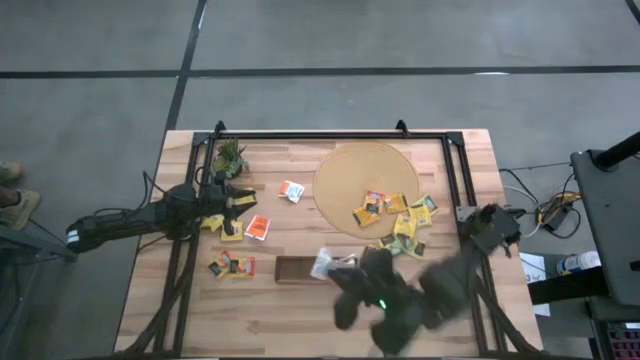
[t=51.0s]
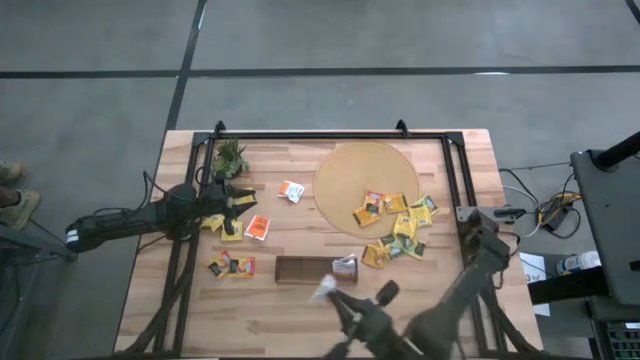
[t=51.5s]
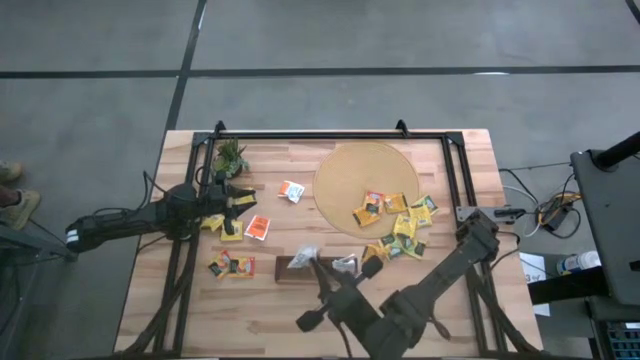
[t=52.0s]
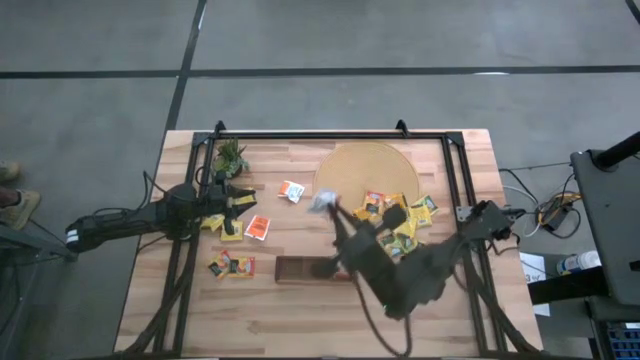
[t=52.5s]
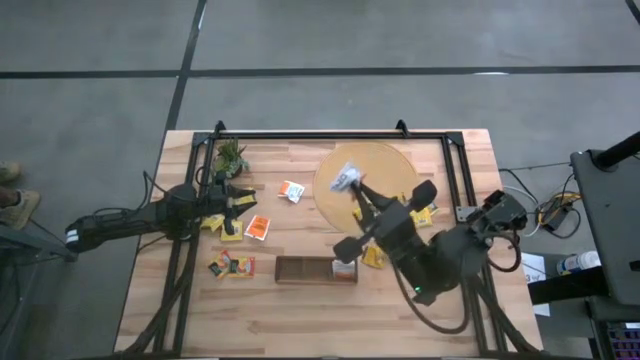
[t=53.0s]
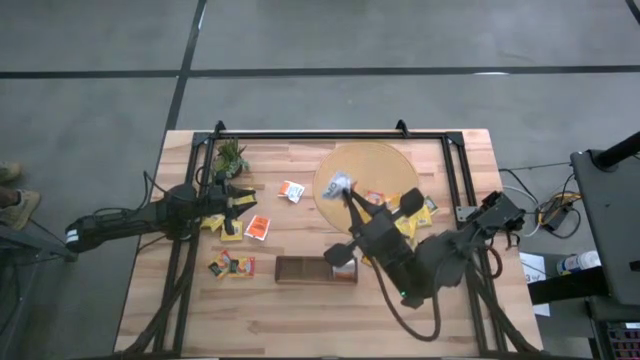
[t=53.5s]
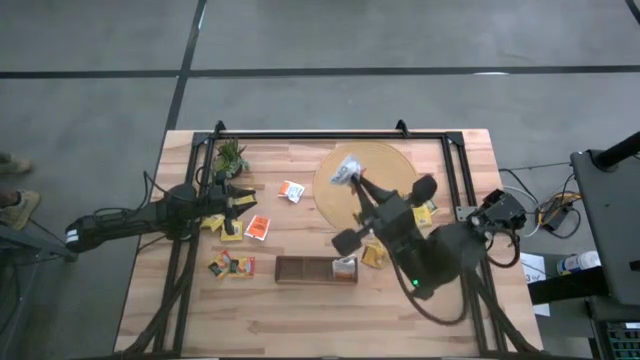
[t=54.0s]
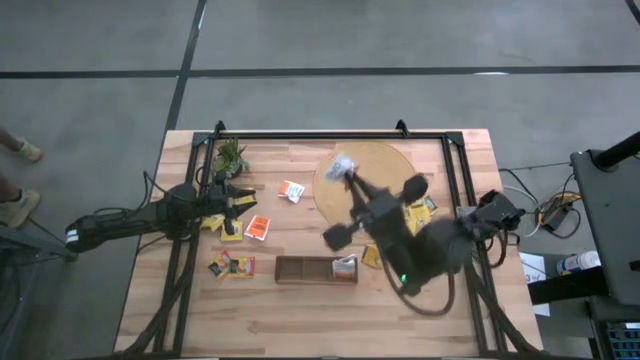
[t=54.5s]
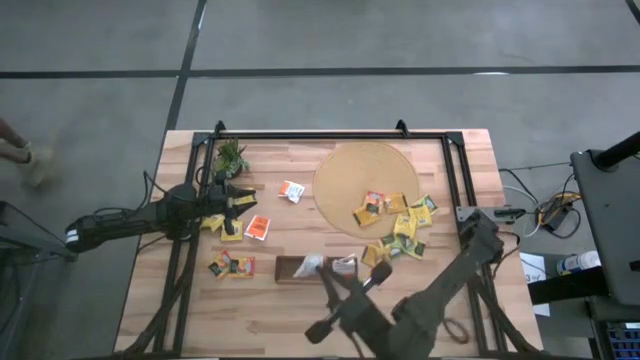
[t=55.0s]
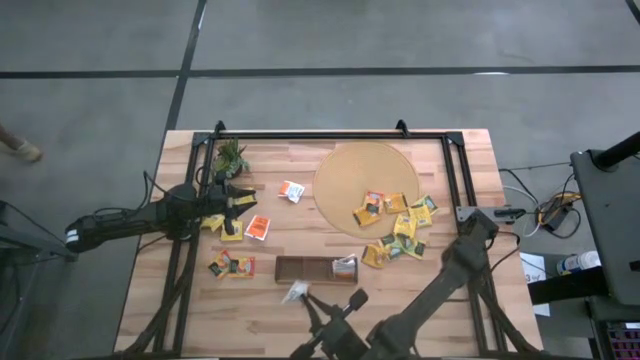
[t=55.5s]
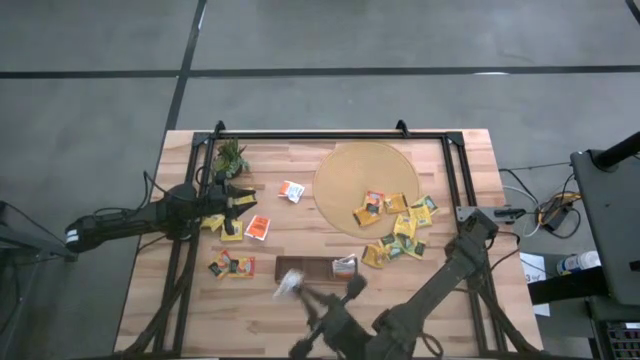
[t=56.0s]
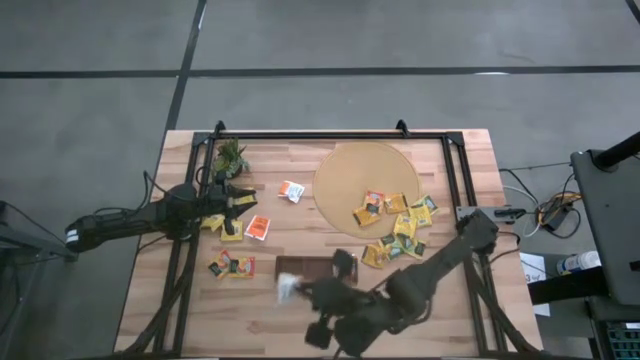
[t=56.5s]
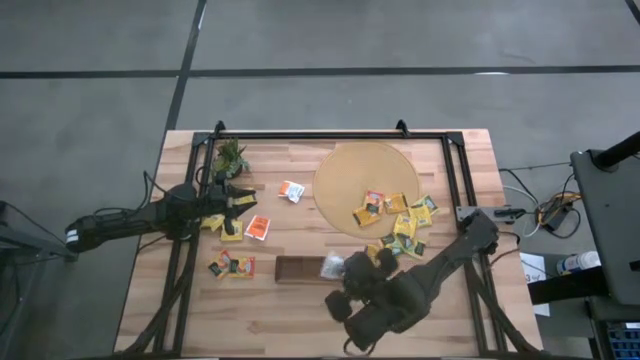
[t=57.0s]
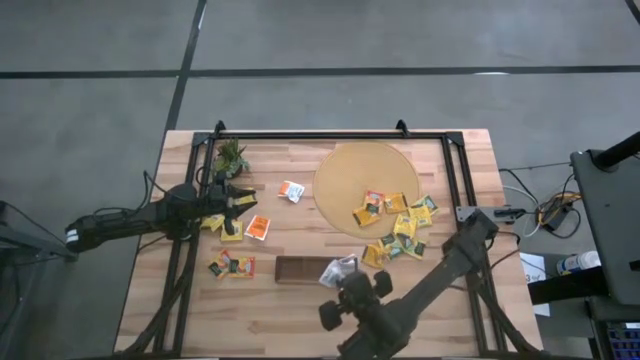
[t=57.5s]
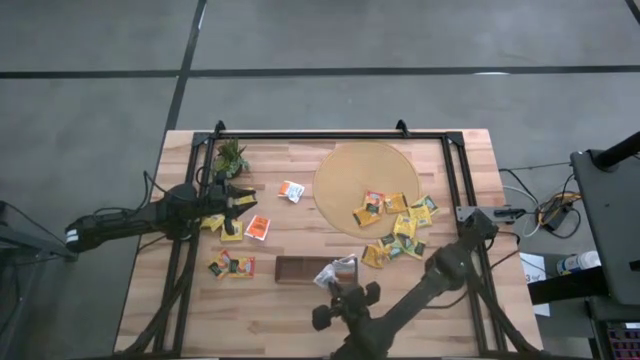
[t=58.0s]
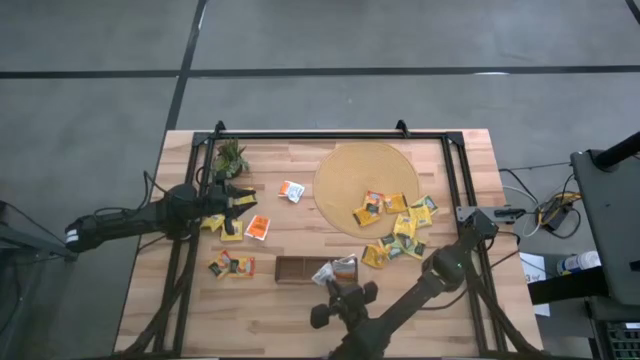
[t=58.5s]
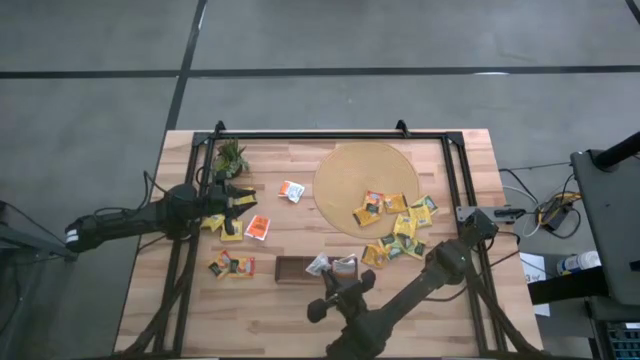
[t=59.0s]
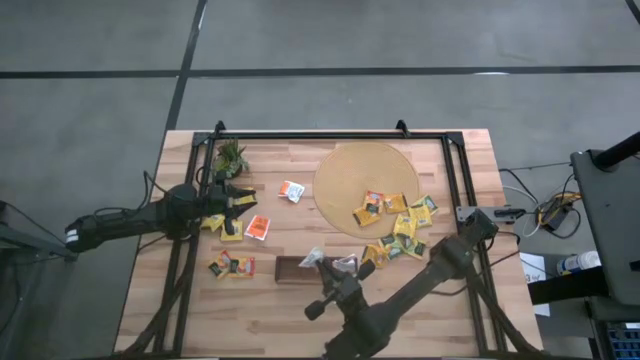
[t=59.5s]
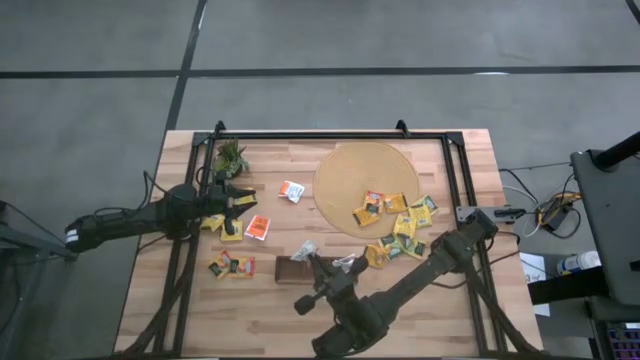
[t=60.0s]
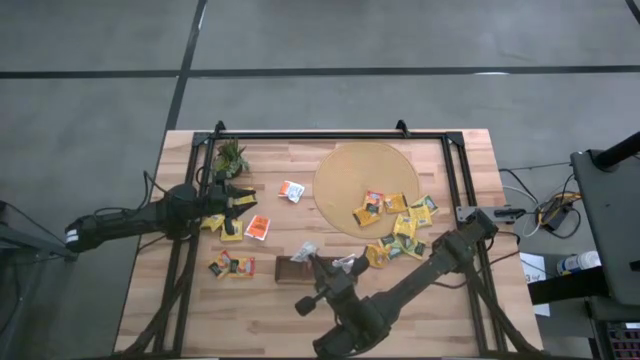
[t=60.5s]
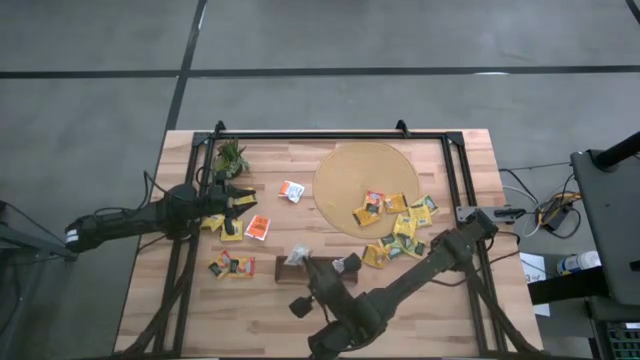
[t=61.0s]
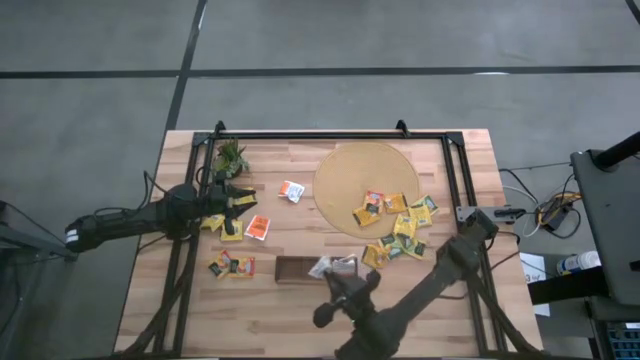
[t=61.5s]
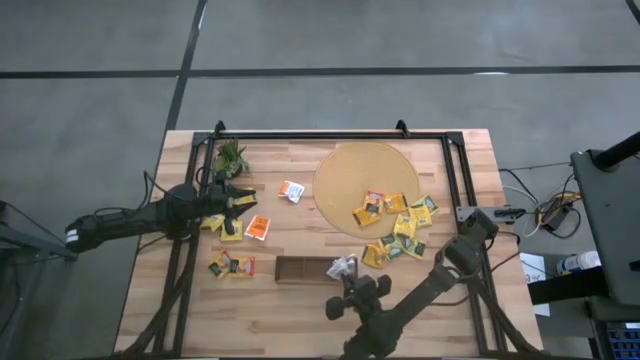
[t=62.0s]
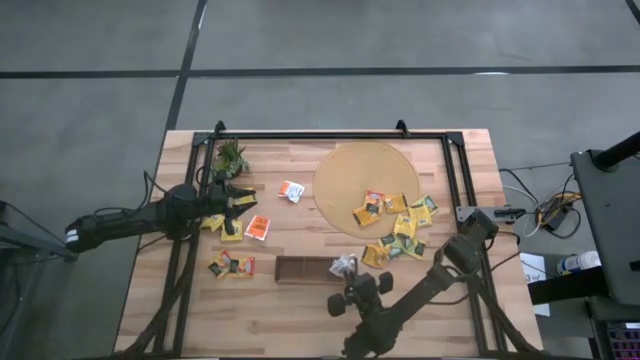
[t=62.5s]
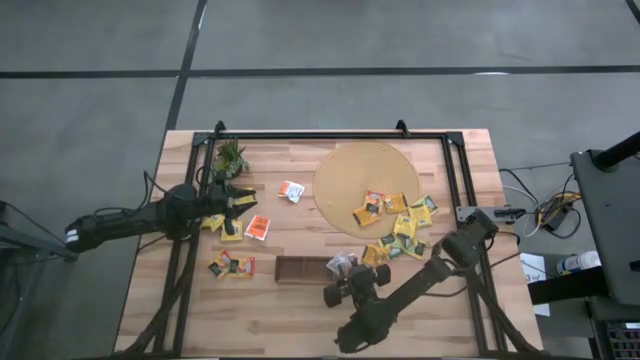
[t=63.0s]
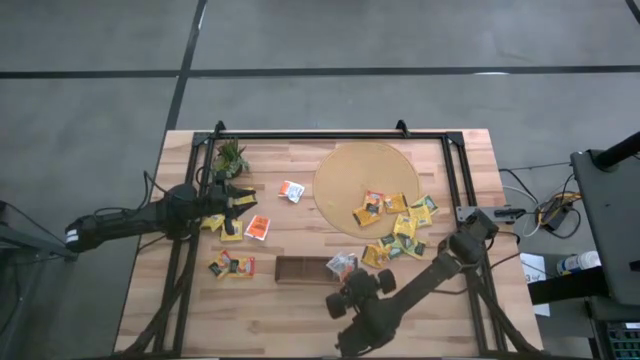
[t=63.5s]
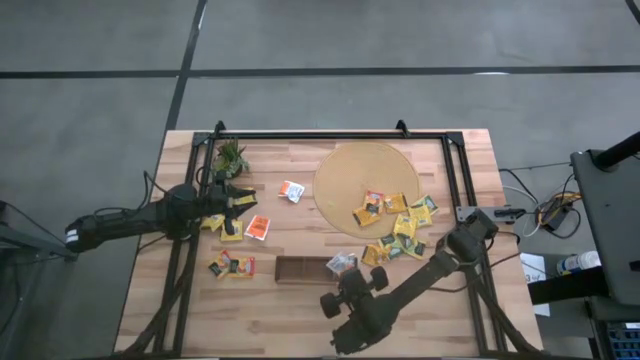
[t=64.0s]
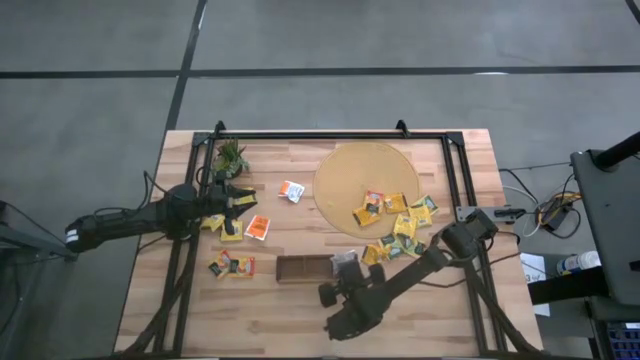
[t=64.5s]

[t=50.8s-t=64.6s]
Task: Pick & Place Tea
Put the white tea bag into the right section of the wooden organizer
